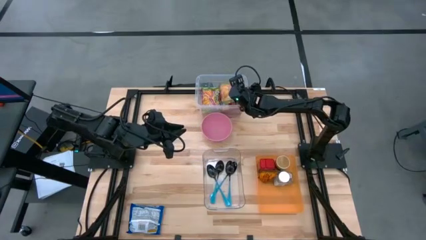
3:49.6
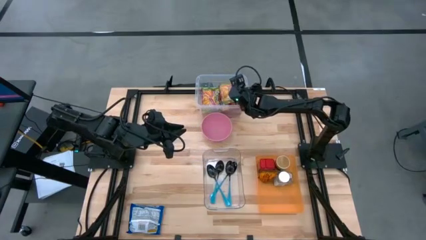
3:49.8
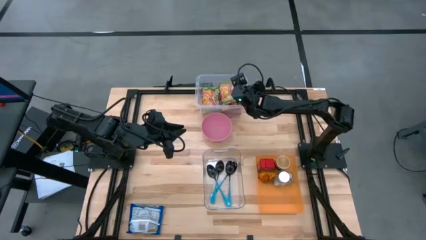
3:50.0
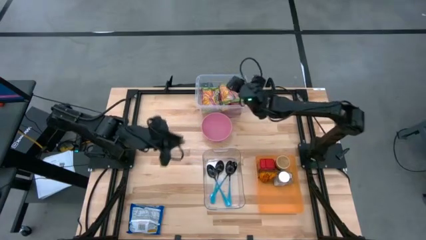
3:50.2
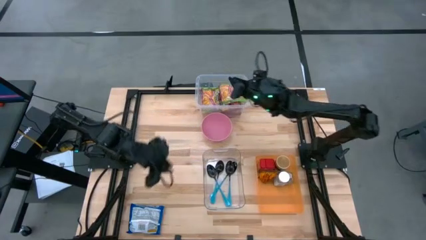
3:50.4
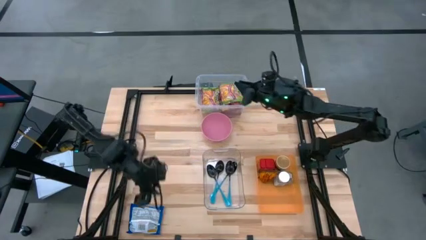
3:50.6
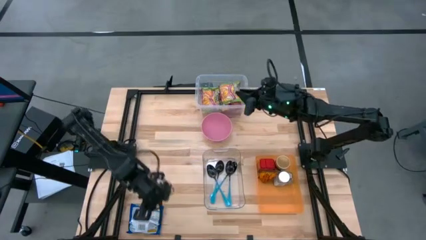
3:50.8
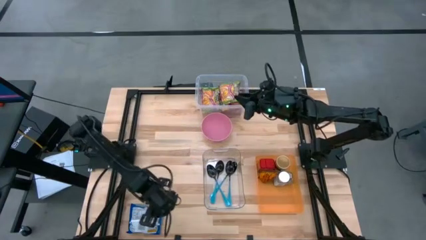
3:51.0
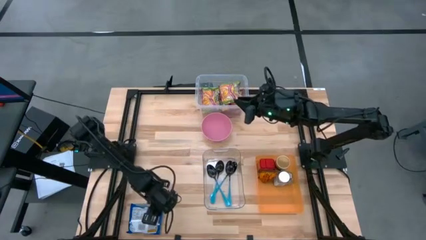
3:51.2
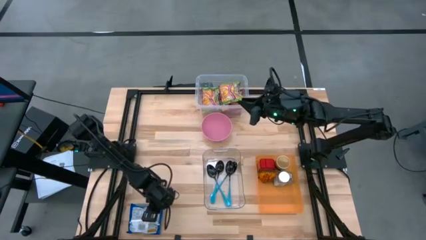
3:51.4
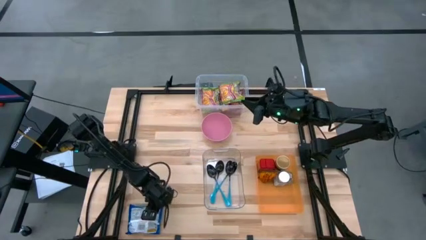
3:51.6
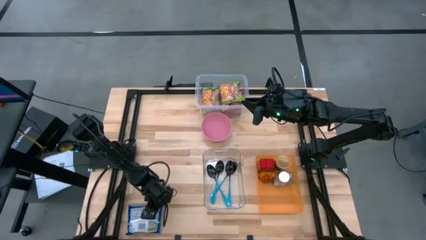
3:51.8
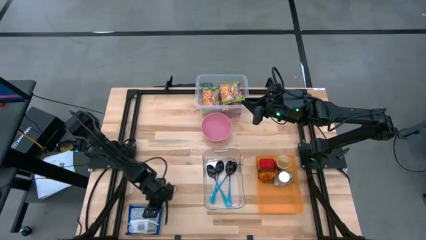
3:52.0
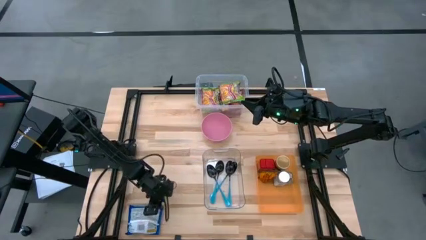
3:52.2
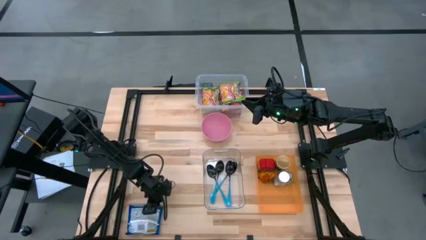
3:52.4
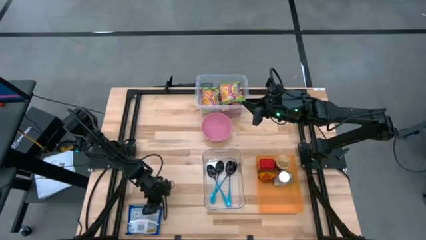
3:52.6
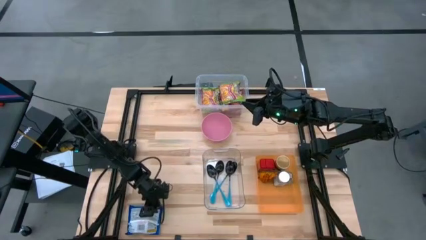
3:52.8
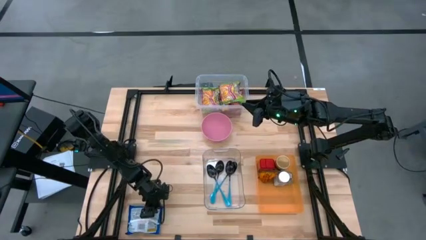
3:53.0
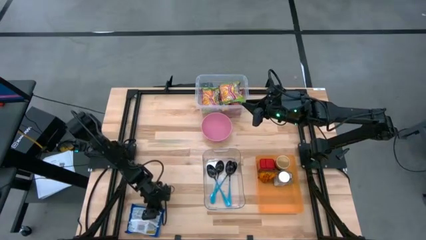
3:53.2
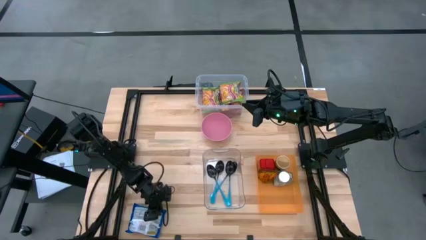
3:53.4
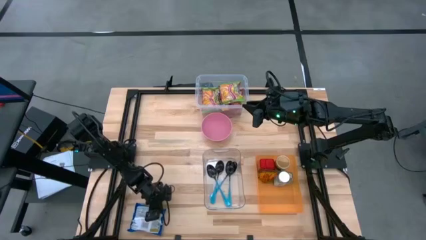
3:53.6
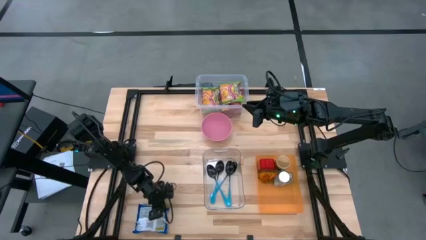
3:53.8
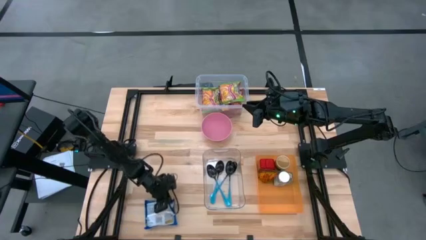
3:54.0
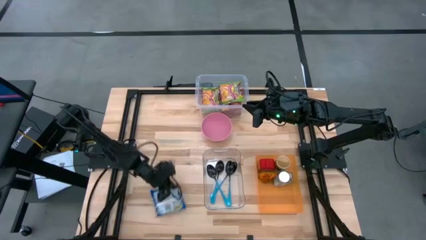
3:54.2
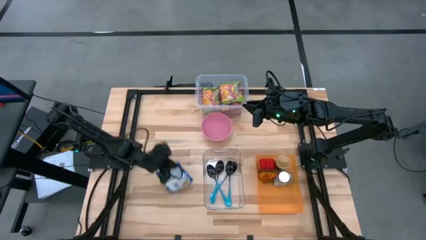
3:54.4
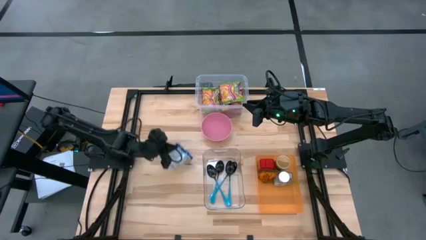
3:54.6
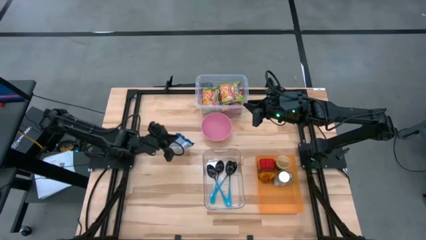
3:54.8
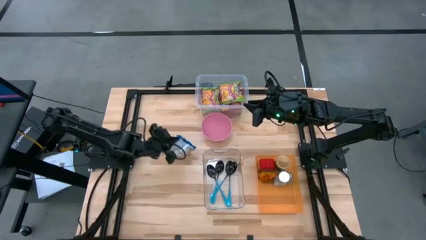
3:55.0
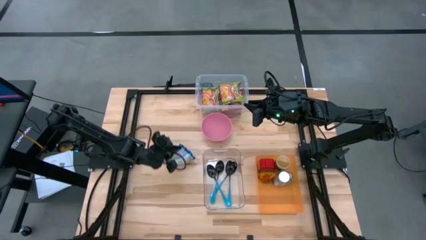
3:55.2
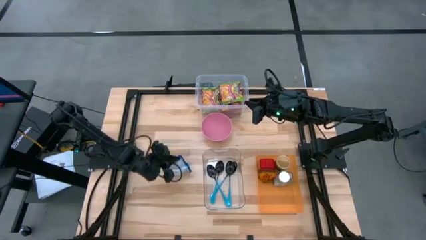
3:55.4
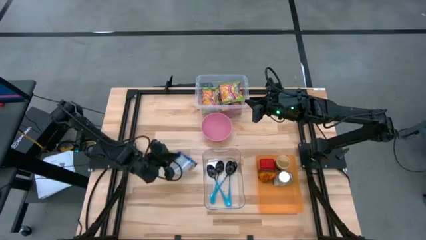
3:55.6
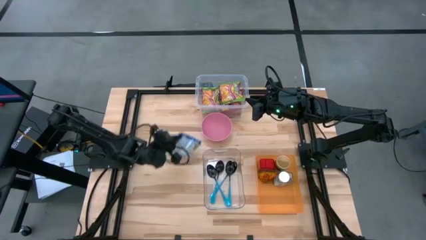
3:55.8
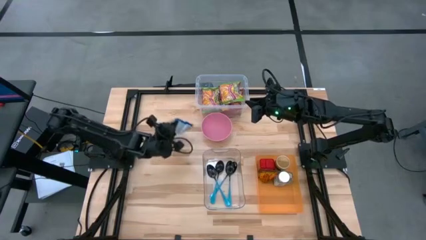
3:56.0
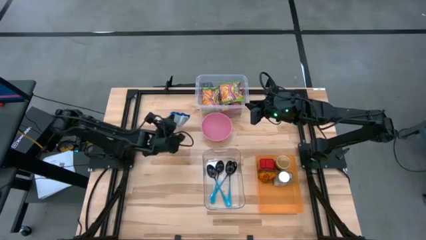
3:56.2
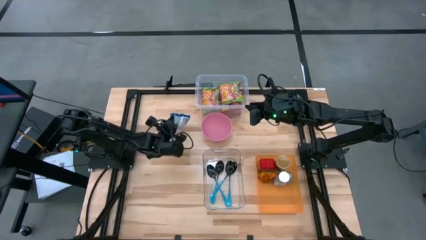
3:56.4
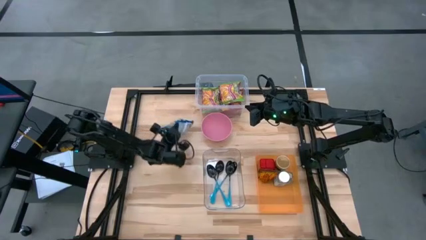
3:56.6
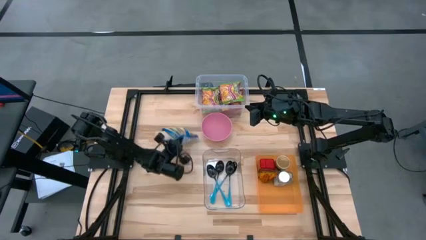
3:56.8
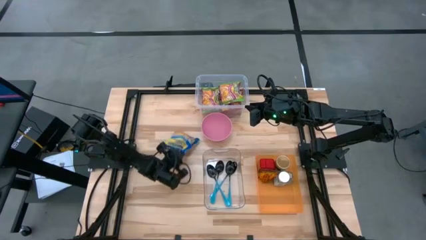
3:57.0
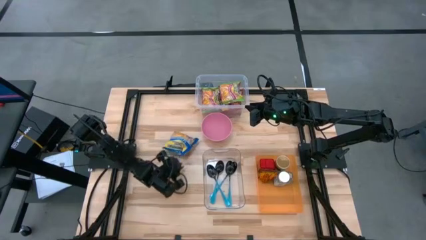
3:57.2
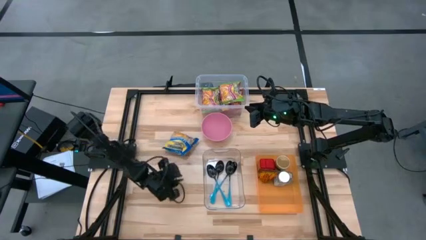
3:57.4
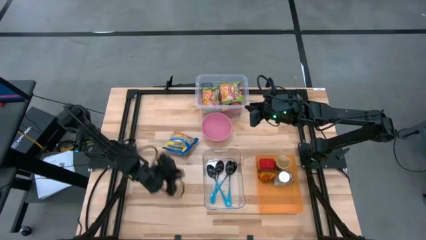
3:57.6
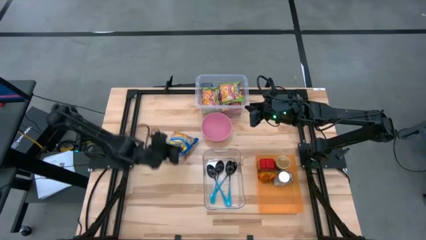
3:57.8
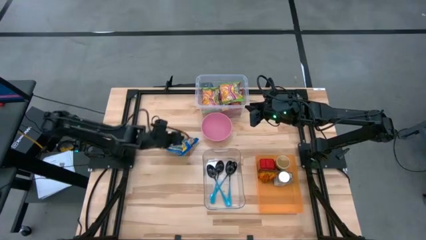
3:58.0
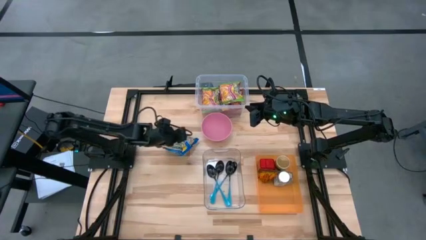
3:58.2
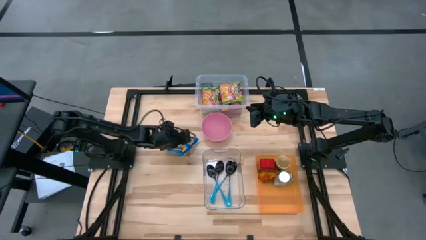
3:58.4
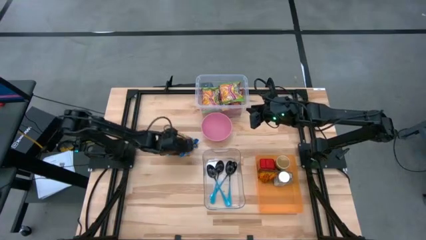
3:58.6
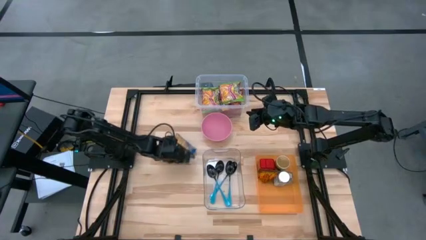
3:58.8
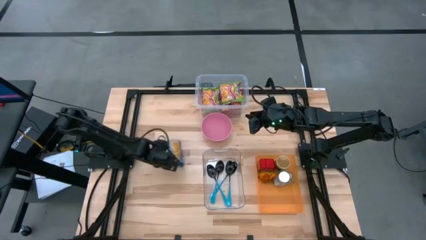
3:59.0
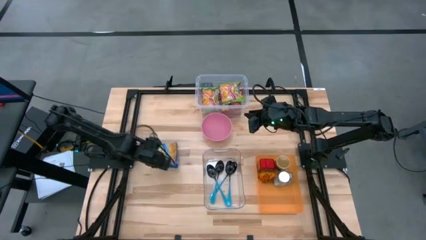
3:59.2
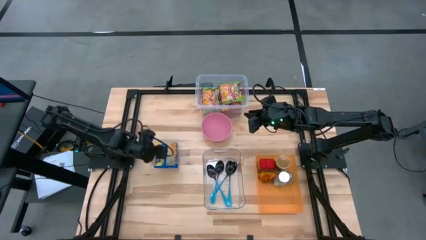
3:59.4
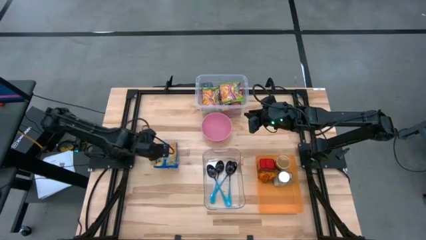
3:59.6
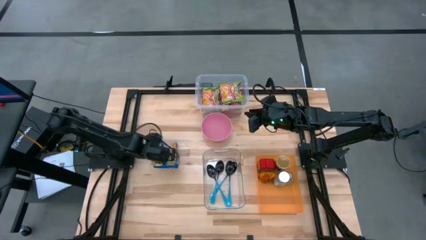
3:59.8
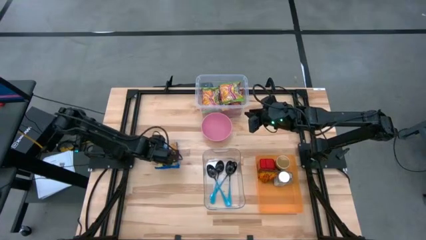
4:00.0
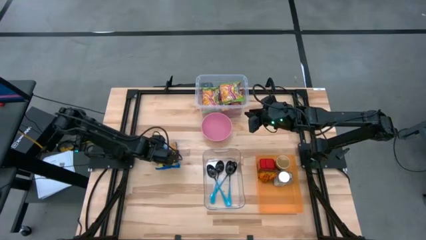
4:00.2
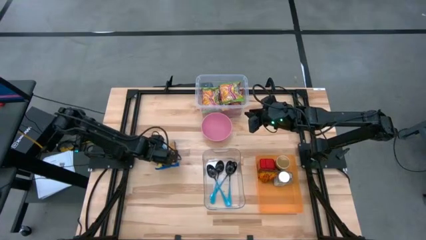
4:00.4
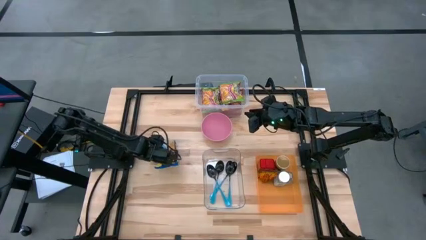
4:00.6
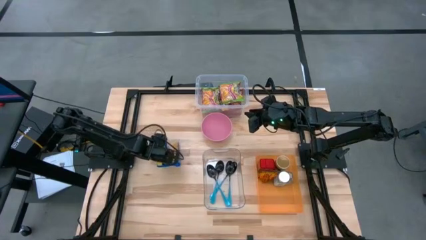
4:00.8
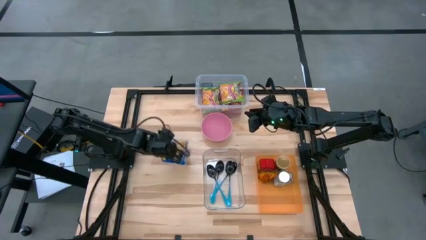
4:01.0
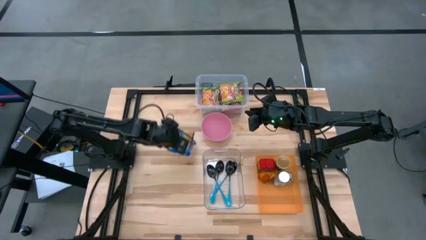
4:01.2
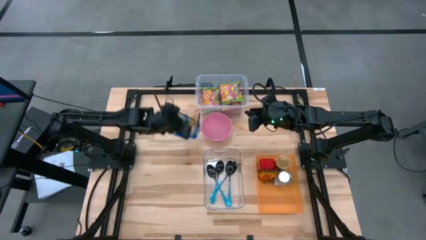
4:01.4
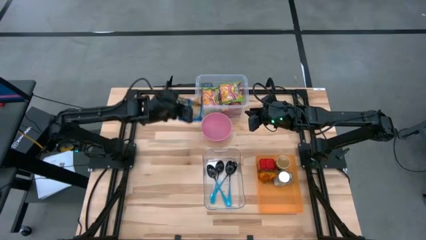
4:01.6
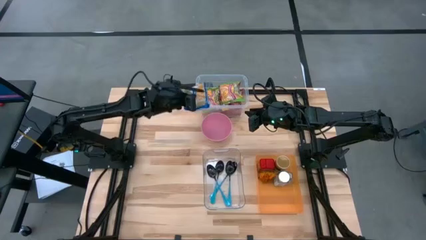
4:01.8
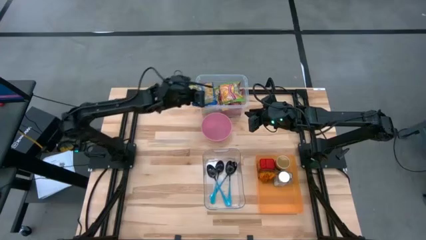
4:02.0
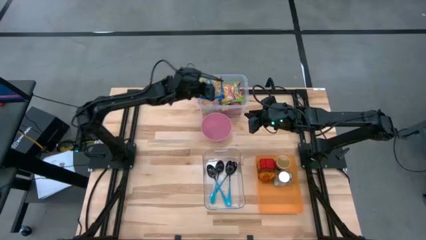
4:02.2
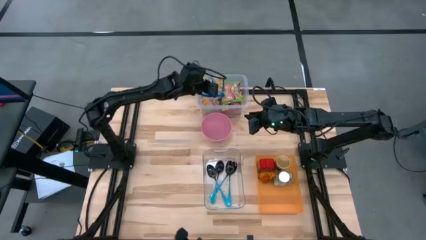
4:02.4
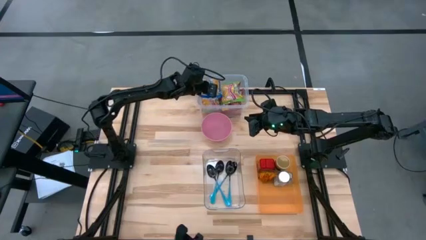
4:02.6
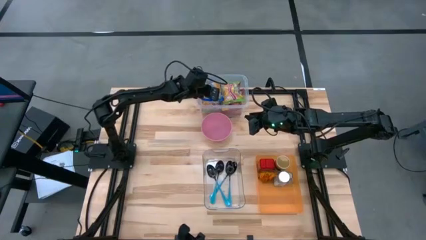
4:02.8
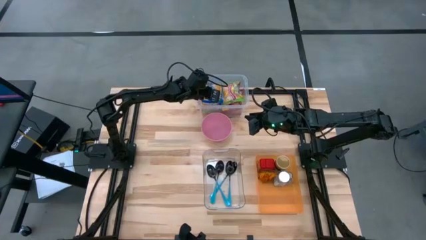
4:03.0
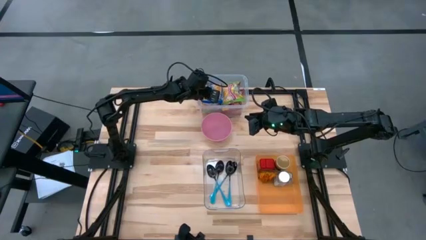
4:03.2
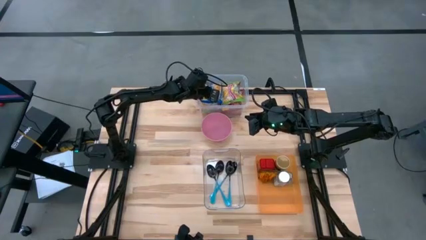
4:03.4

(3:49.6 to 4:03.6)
Task: Pick & Place Food Item
Put the blue noodle pack into the top transparent bin

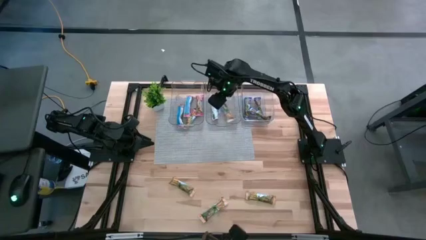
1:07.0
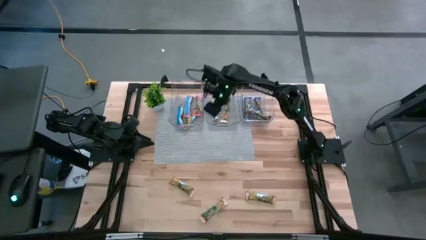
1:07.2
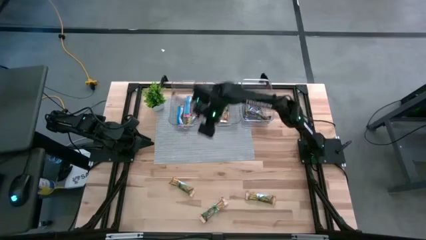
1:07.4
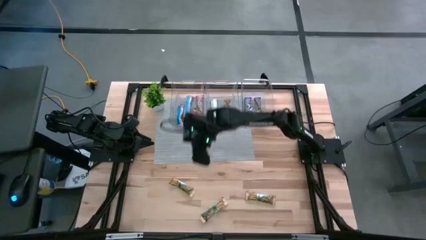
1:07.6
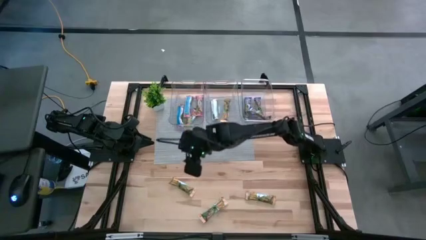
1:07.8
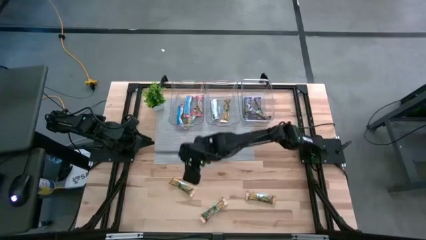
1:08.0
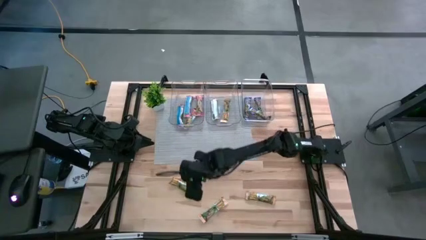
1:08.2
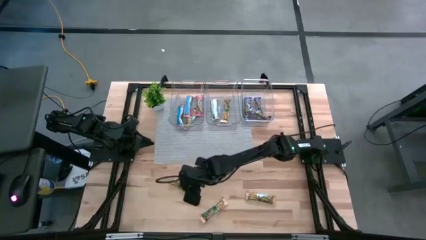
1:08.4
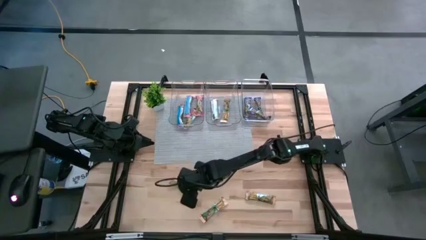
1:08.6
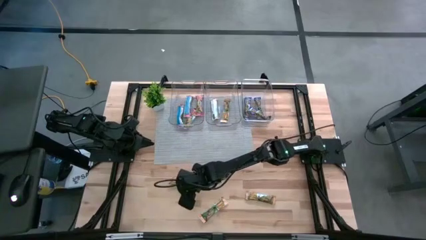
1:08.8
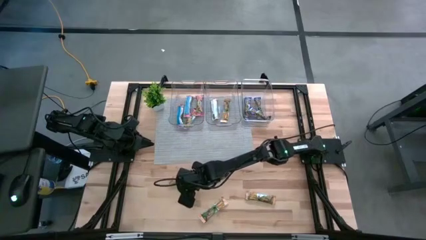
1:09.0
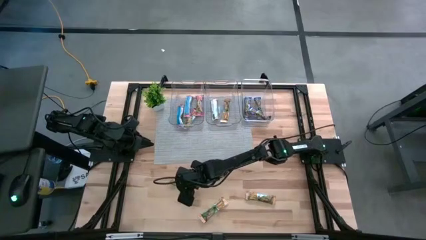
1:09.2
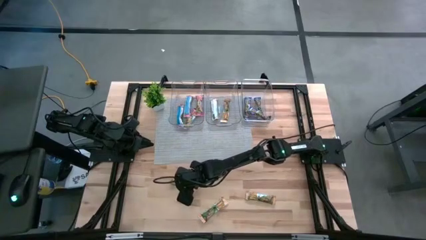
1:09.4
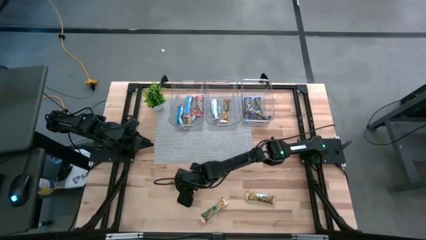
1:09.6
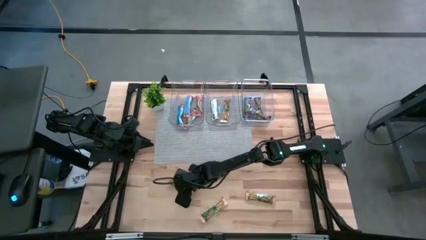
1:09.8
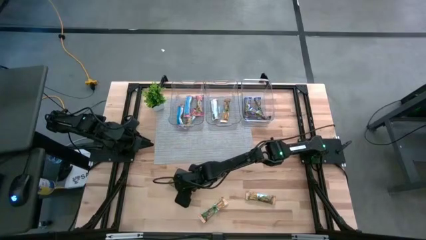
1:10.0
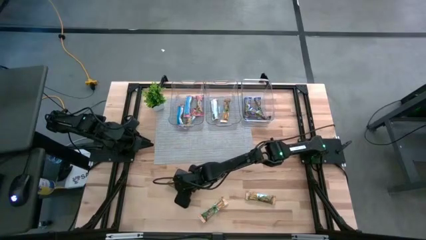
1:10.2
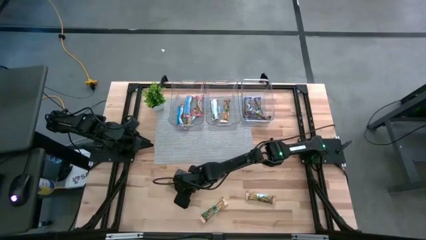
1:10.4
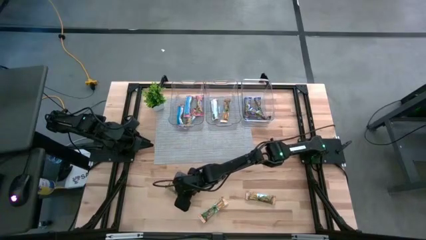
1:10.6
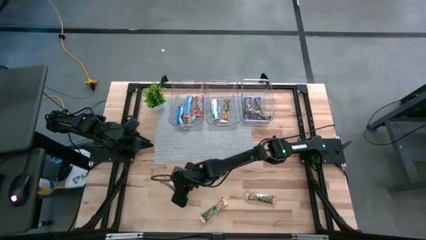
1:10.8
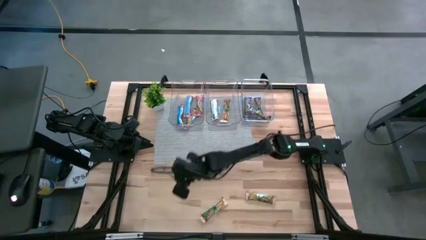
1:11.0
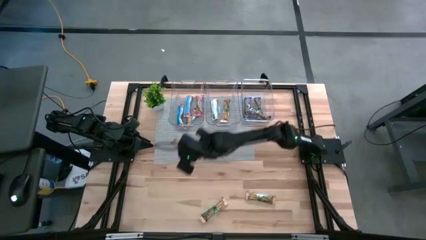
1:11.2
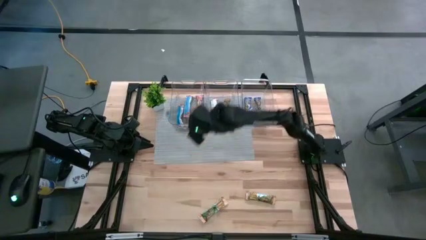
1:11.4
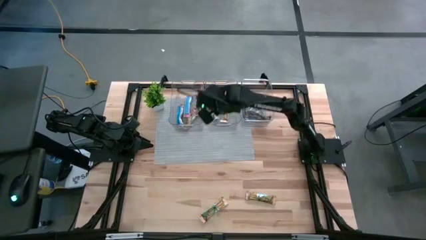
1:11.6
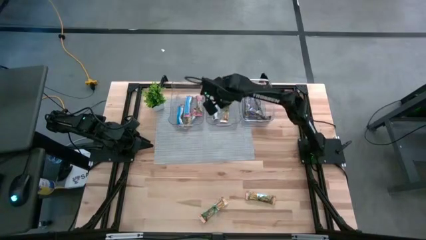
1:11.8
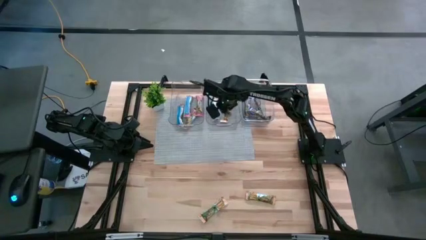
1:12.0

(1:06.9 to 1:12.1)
Task: Pick and place Granola Bars by type
Put the yellow granola bar into the middle transparent bin
